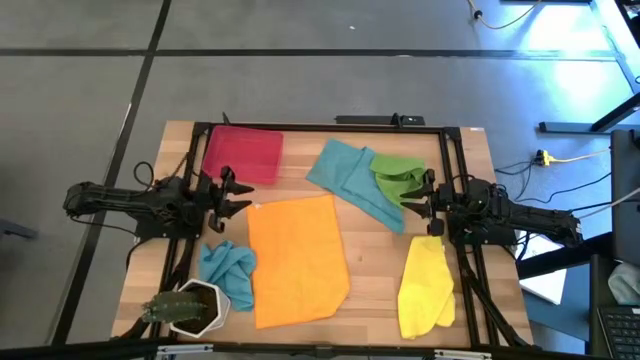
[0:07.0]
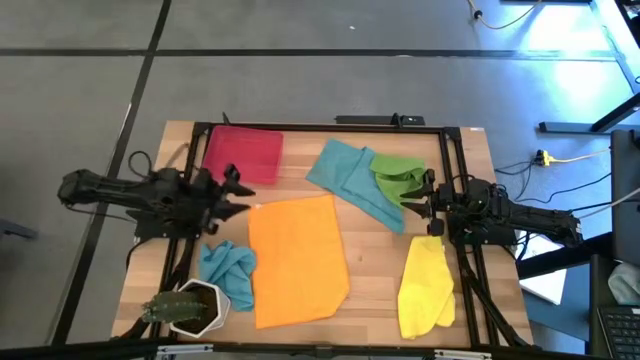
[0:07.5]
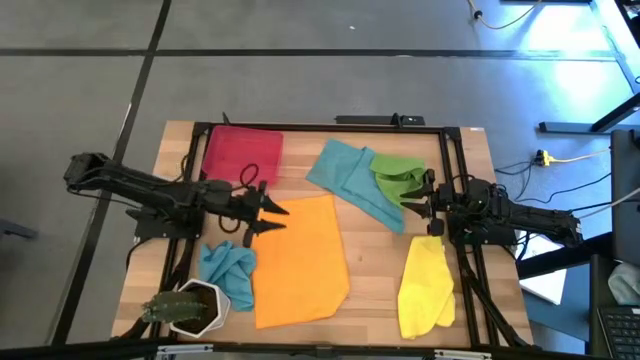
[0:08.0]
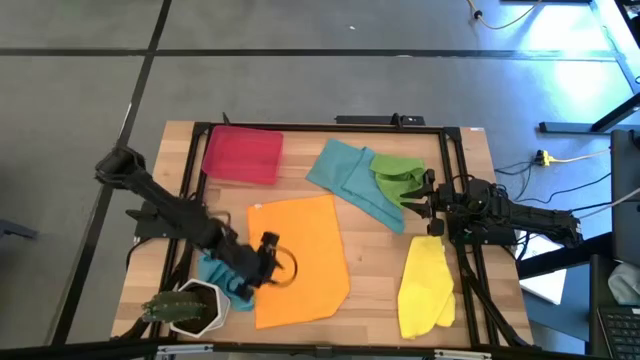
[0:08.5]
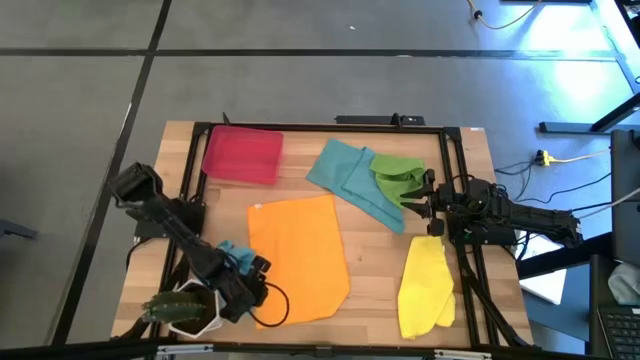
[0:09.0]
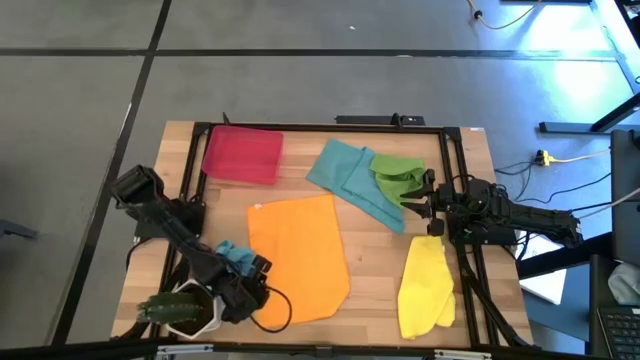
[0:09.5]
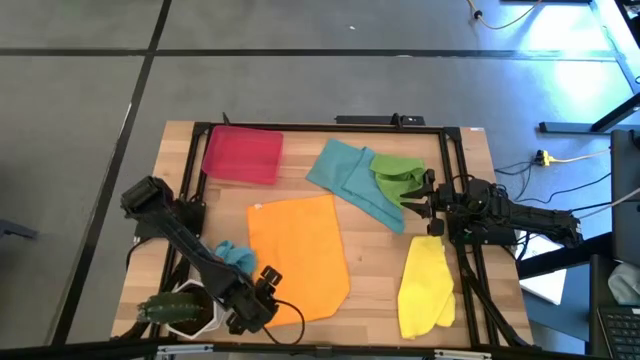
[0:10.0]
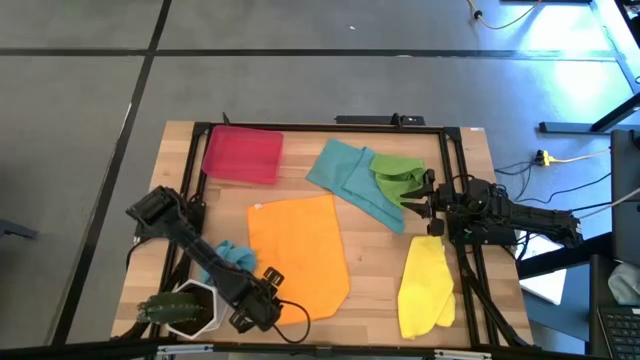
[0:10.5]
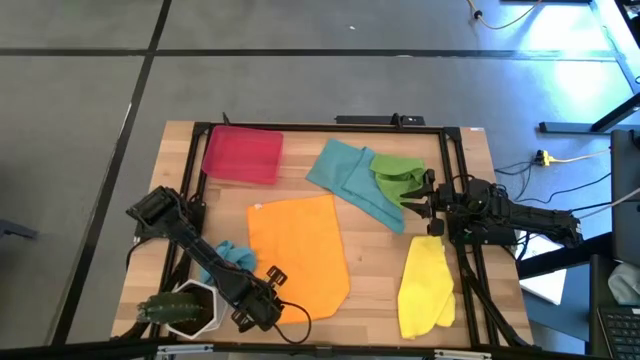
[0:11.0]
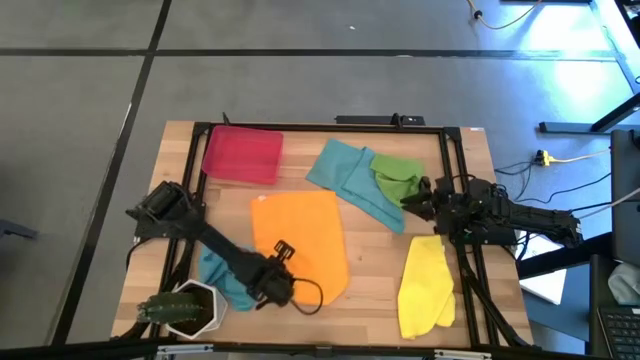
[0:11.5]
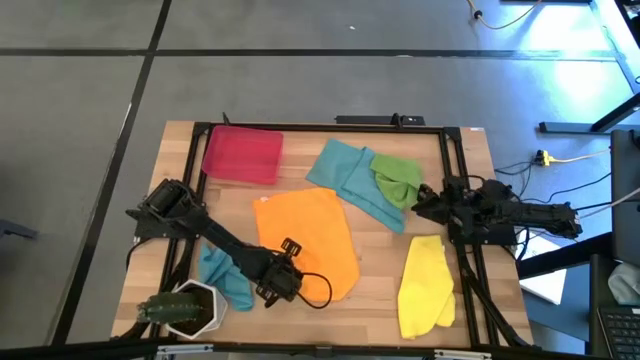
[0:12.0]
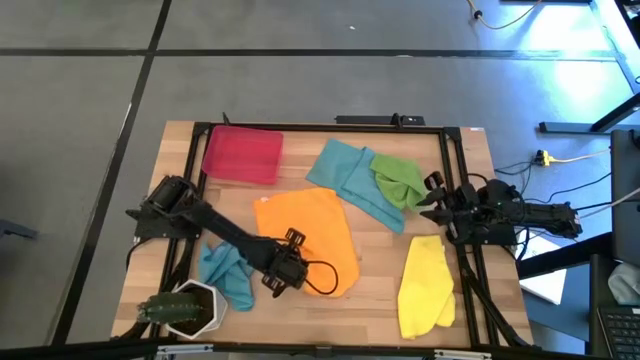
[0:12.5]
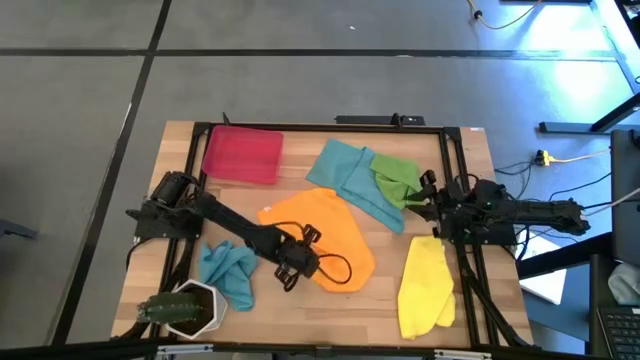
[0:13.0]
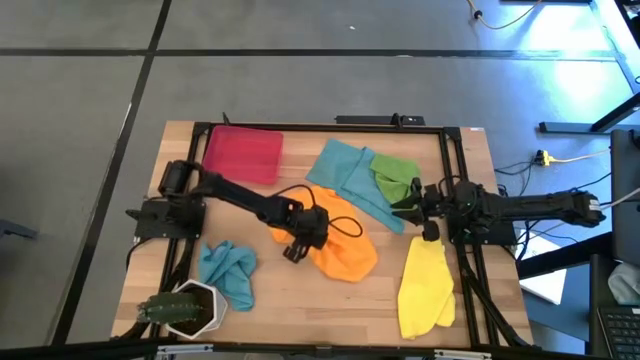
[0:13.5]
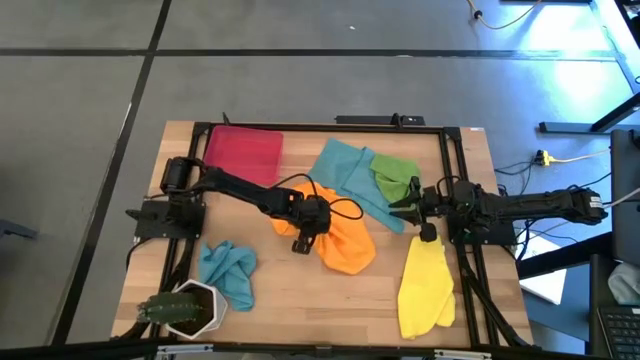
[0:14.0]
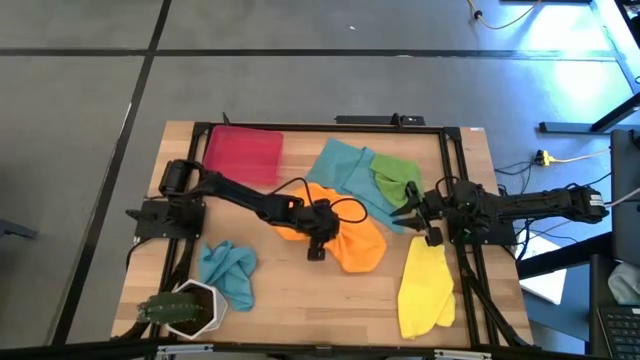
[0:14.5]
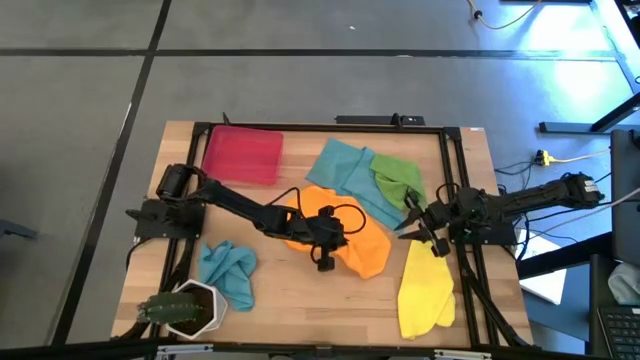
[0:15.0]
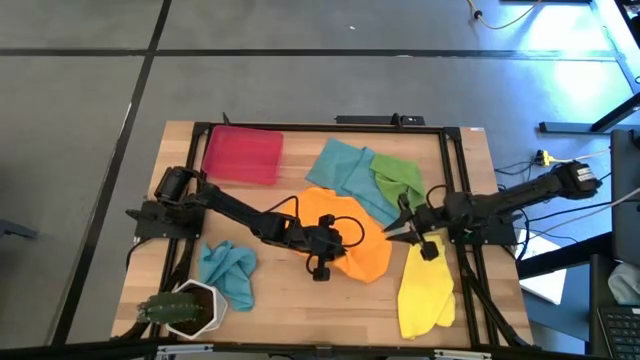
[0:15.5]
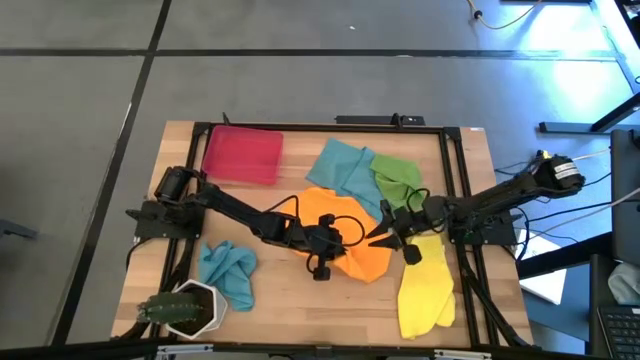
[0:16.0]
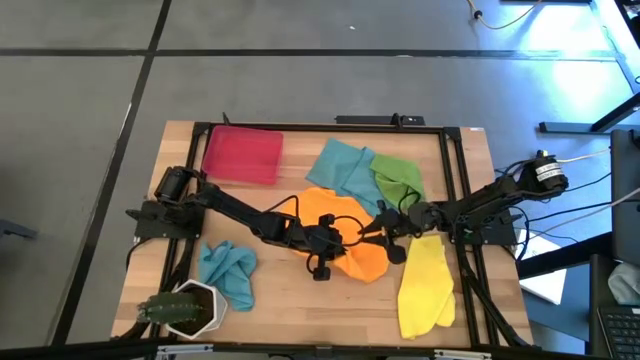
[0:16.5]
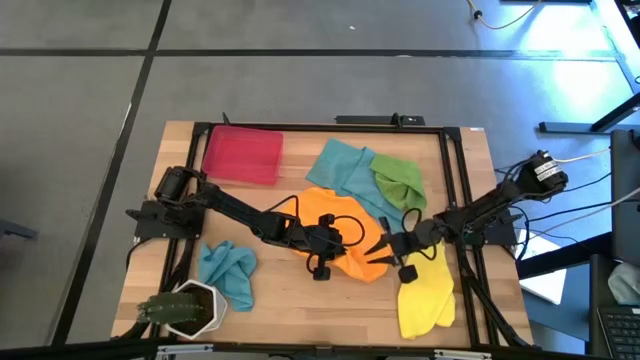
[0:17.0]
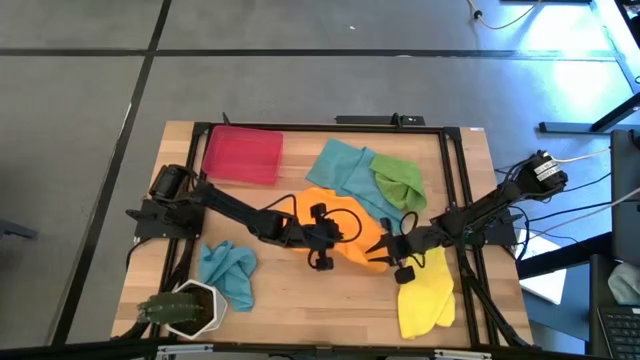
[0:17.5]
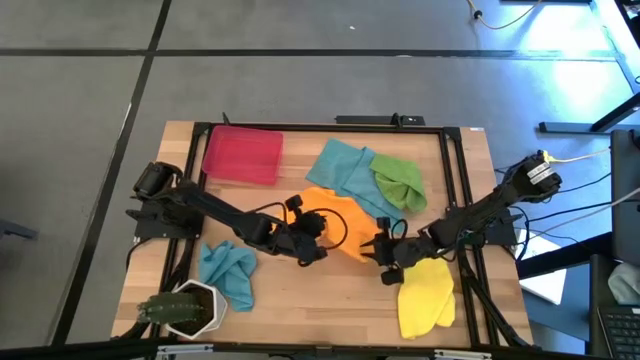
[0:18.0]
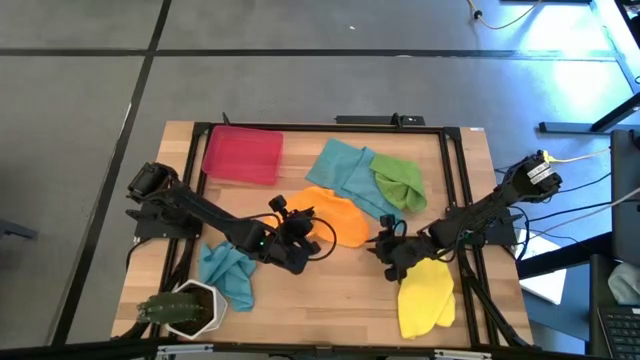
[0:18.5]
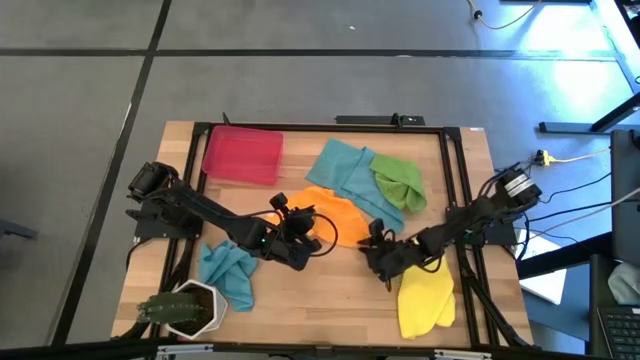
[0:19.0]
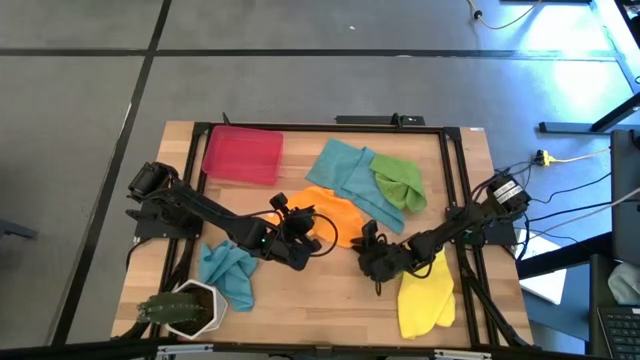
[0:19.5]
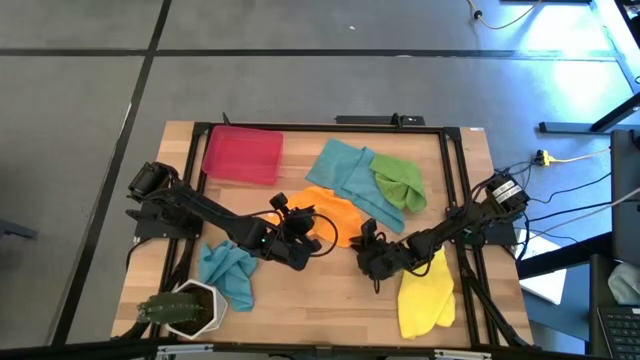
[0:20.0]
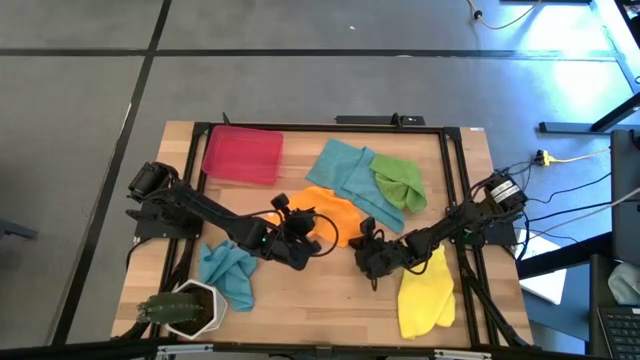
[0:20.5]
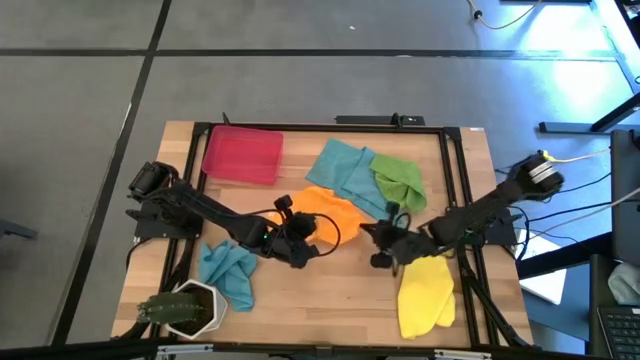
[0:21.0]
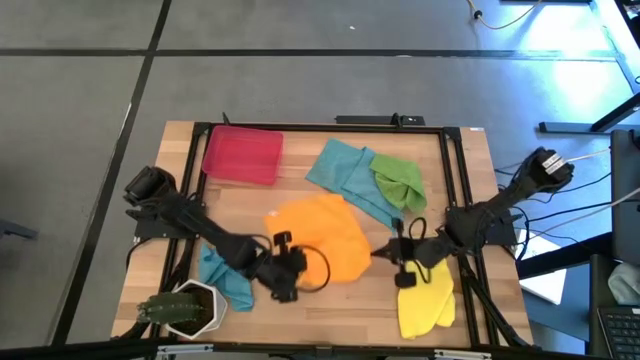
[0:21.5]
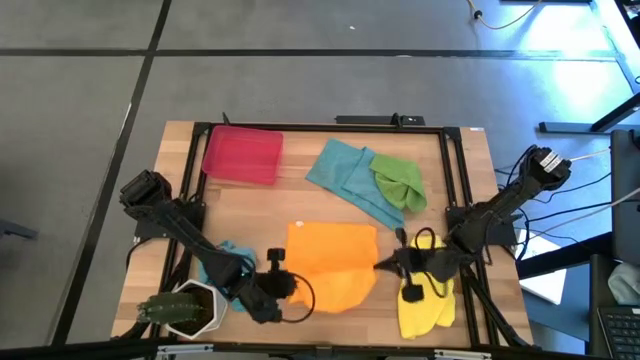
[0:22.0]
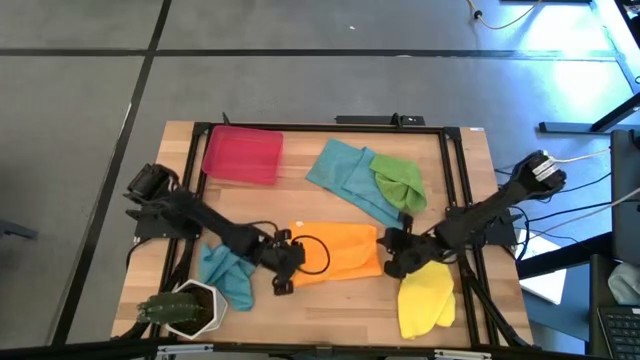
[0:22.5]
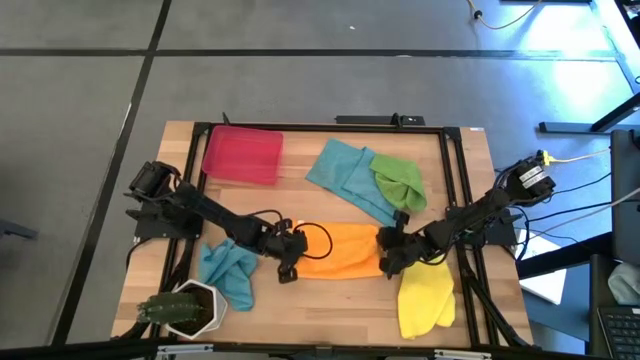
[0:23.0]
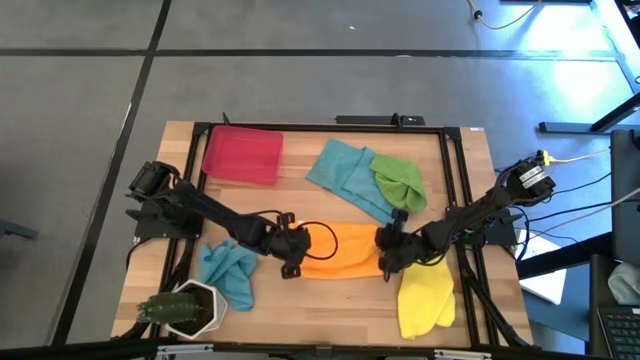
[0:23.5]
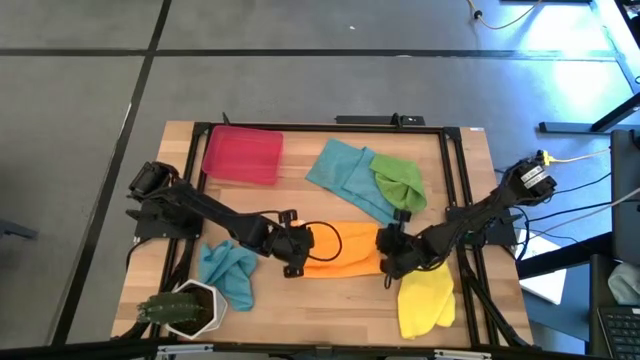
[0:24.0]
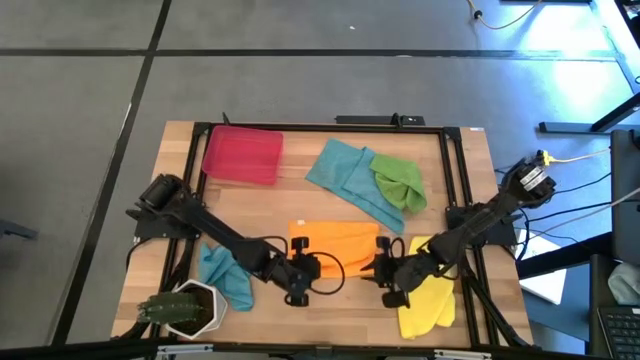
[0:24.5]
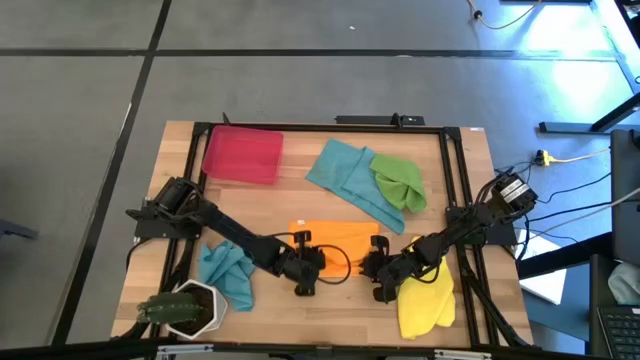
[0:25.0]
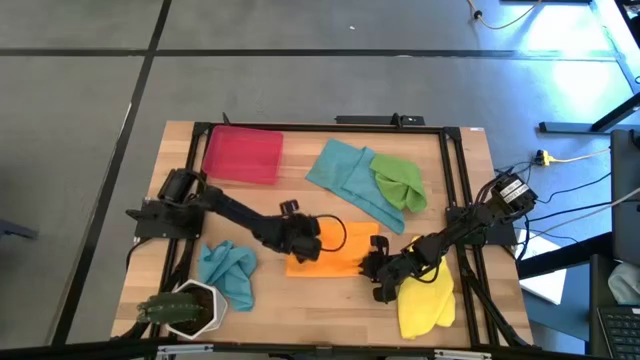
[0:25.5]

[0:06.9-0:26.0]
Task: Roll microfiber towels into tight, uniform cylinder then place into a basket
Fold the orange microfiber towel

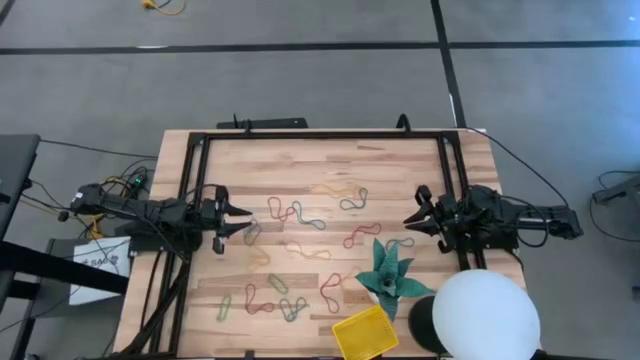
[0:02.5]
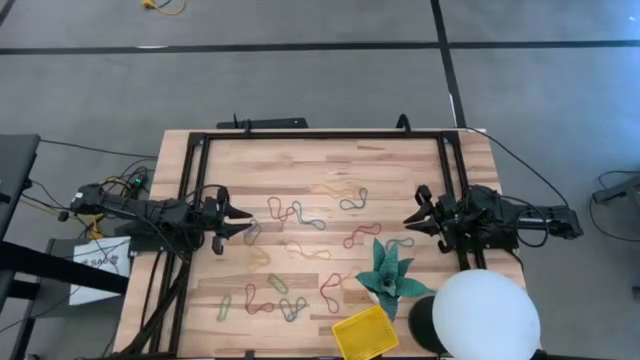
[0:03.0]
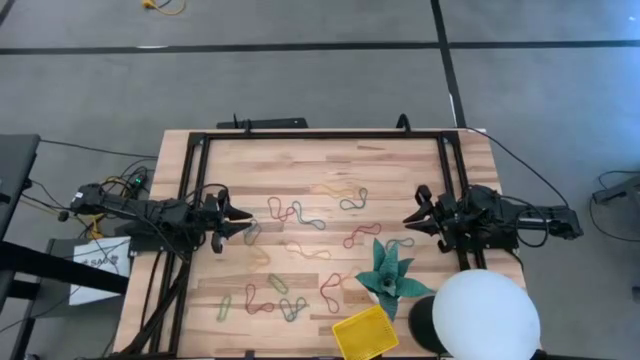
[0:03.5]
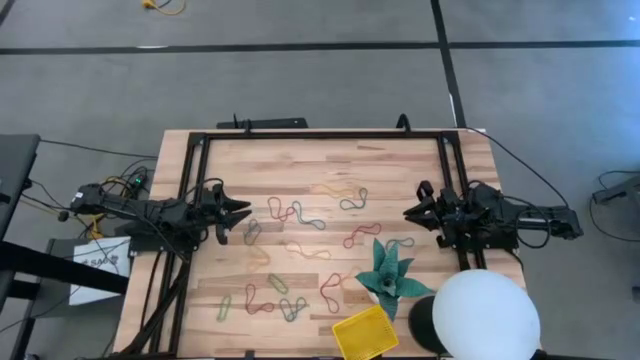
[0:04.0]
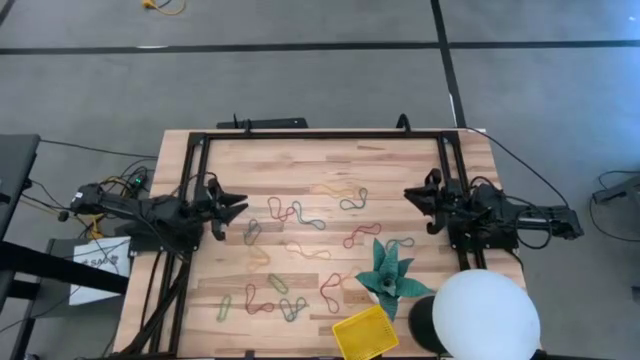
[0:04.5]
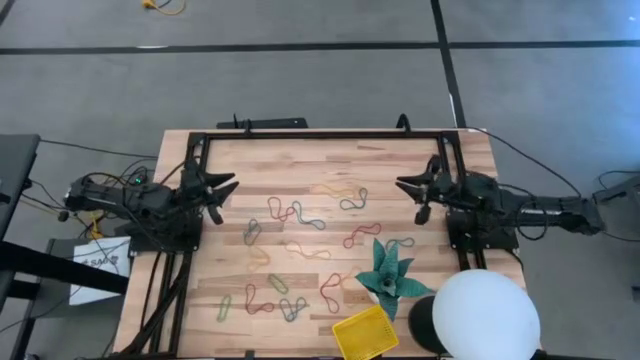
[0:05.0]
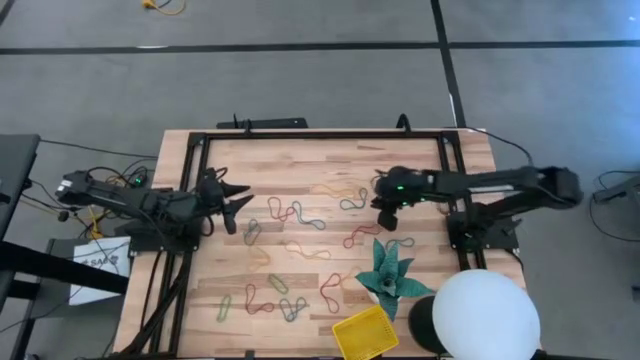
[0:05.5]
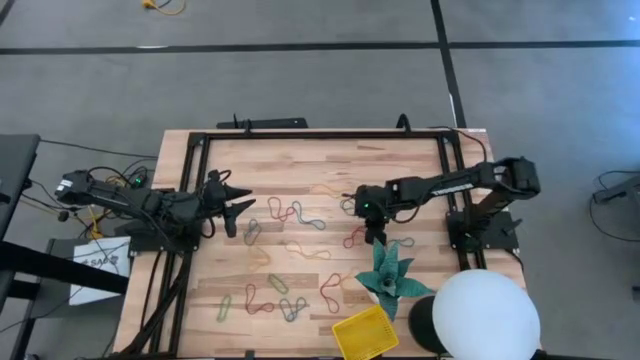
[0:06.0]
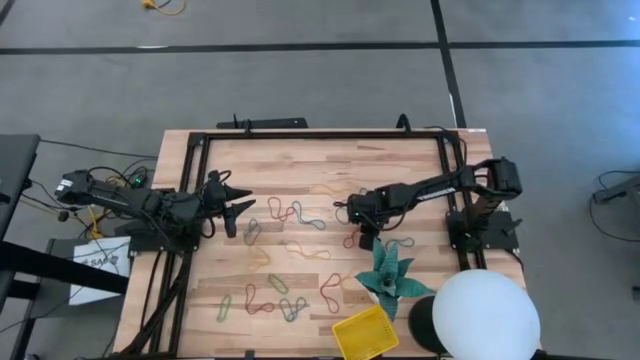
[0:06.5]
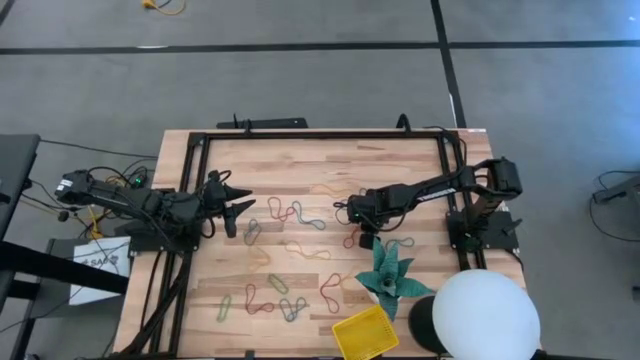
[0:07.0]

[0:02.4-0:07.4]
Task: Pick and place items into bin
Put the red rubber band into the yellow bin
